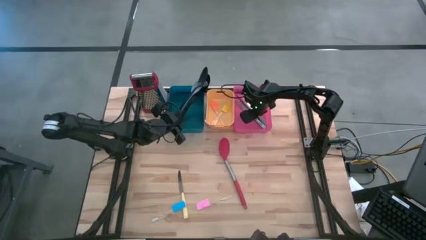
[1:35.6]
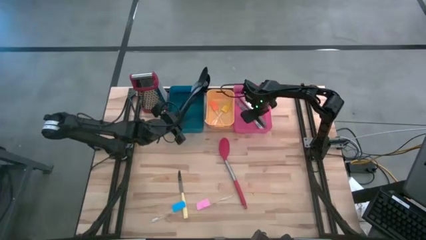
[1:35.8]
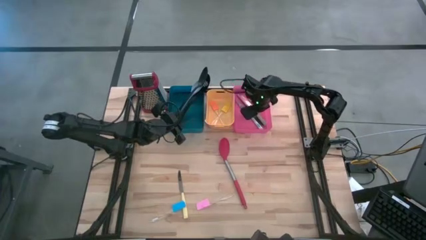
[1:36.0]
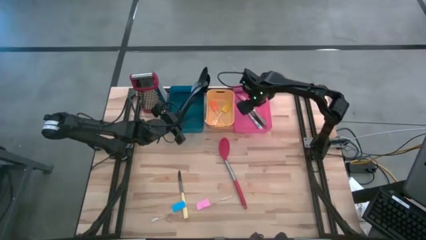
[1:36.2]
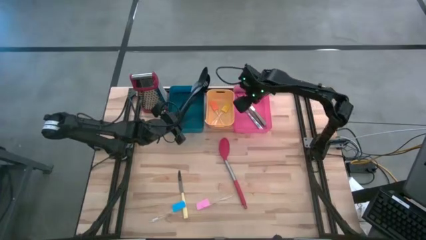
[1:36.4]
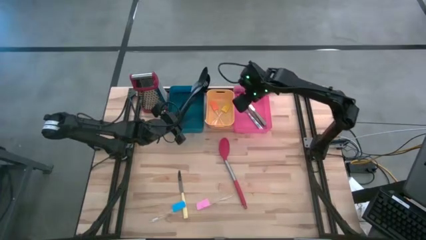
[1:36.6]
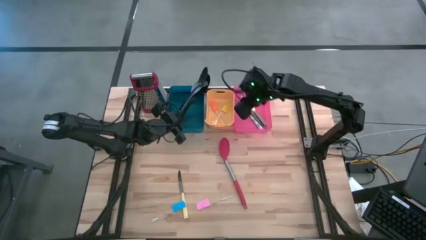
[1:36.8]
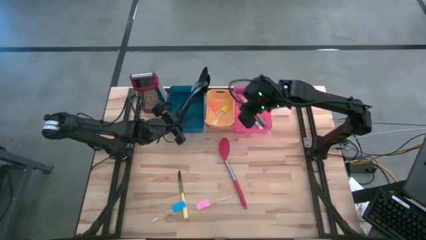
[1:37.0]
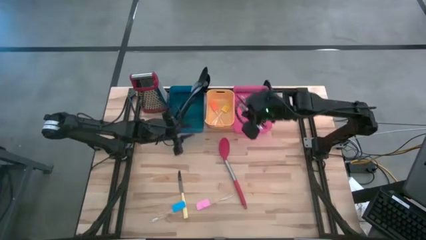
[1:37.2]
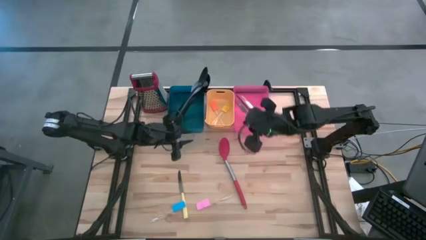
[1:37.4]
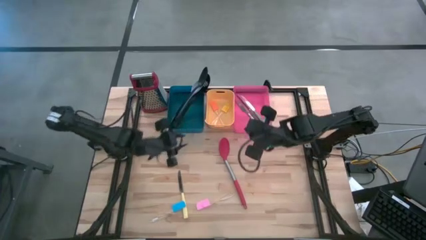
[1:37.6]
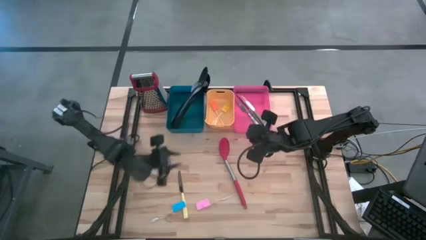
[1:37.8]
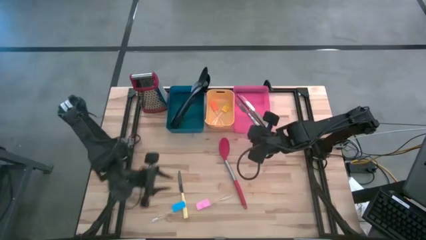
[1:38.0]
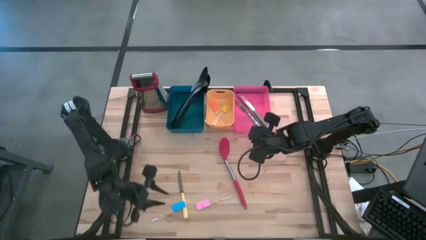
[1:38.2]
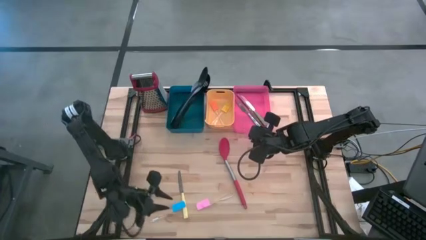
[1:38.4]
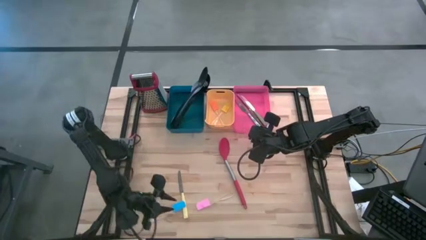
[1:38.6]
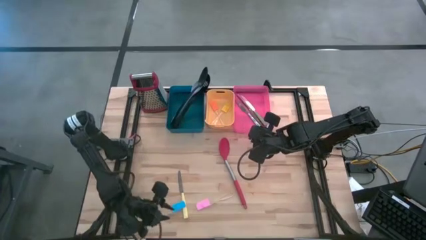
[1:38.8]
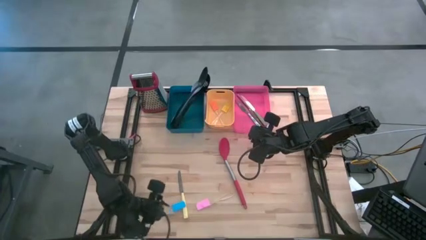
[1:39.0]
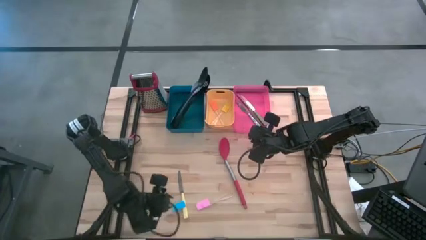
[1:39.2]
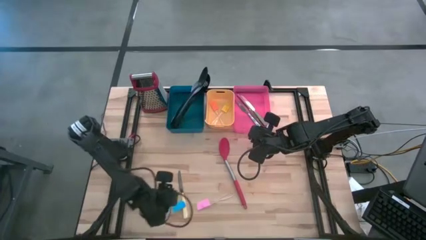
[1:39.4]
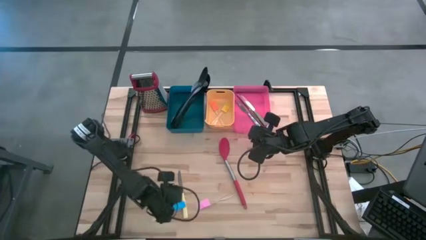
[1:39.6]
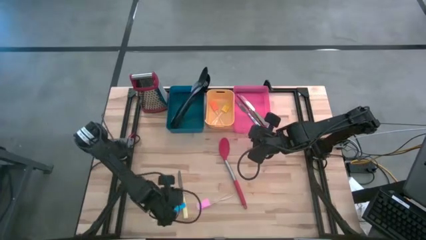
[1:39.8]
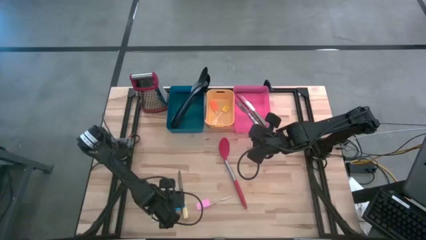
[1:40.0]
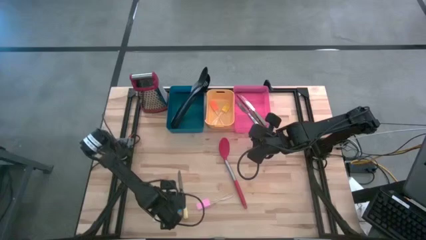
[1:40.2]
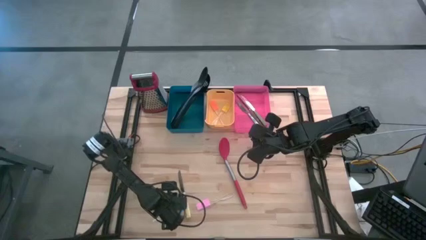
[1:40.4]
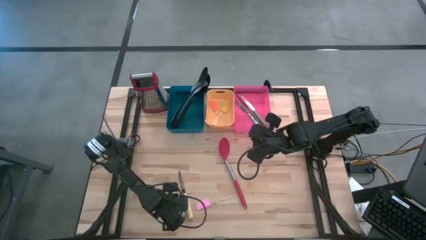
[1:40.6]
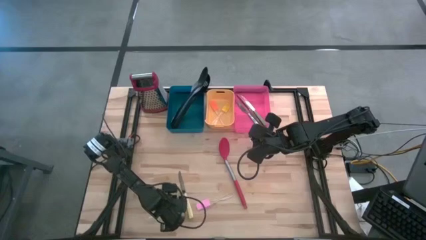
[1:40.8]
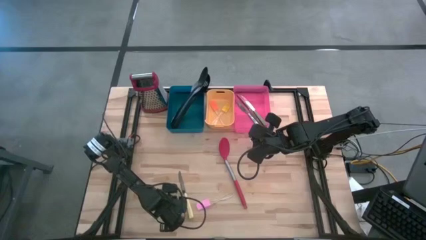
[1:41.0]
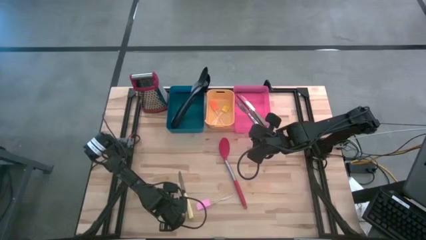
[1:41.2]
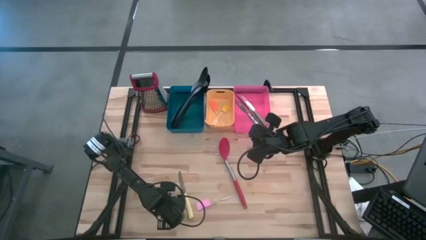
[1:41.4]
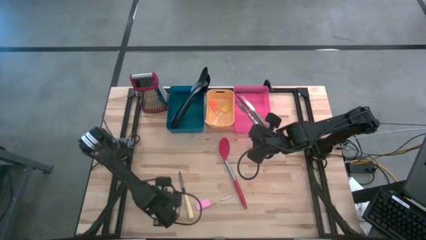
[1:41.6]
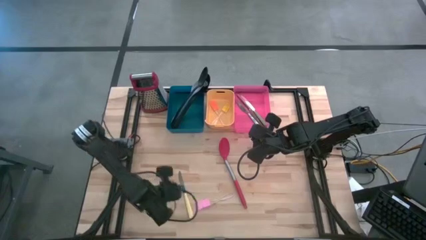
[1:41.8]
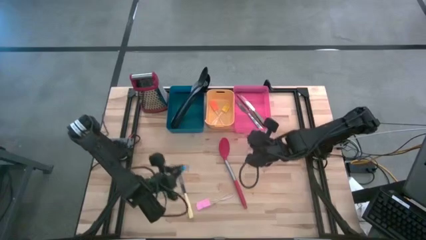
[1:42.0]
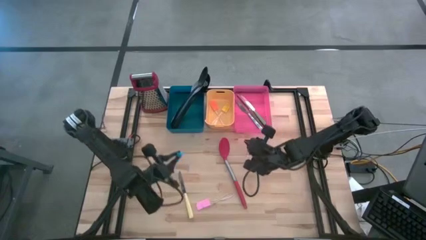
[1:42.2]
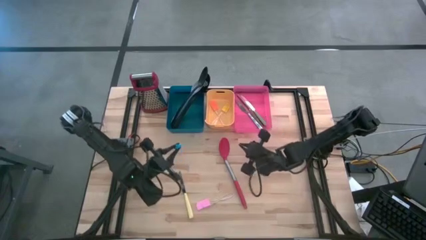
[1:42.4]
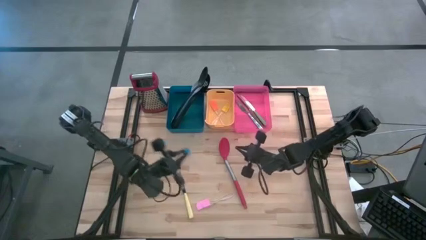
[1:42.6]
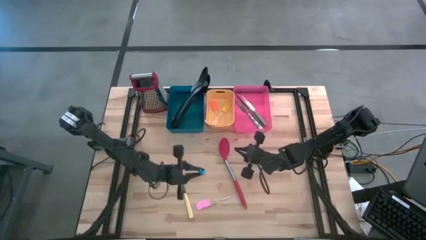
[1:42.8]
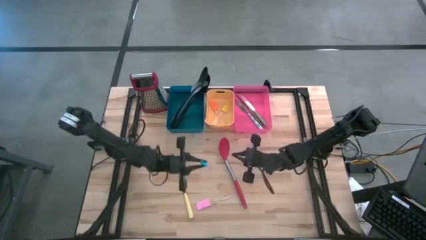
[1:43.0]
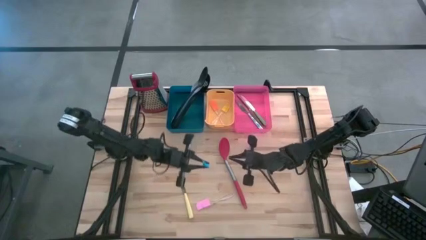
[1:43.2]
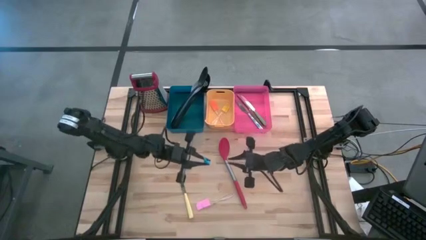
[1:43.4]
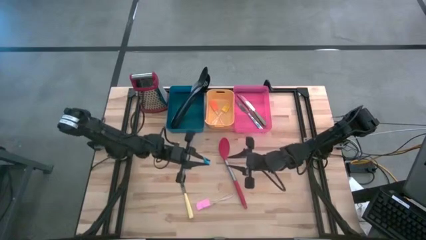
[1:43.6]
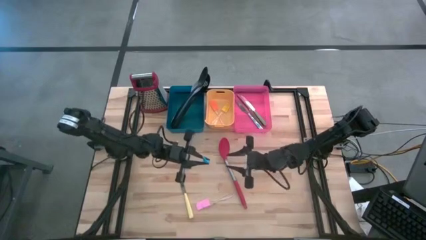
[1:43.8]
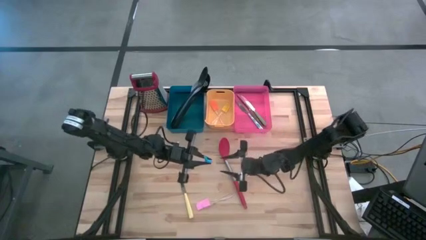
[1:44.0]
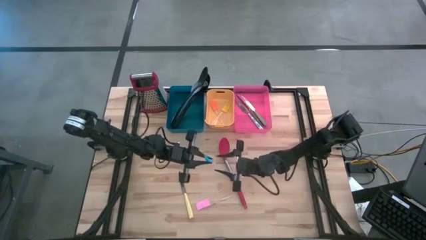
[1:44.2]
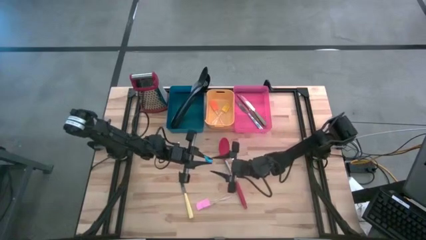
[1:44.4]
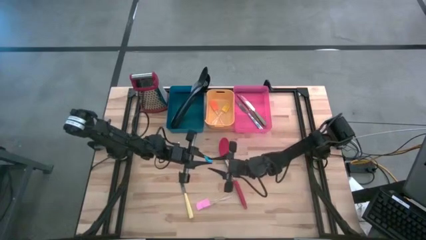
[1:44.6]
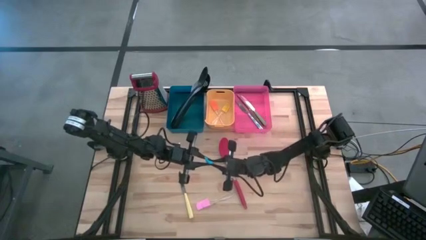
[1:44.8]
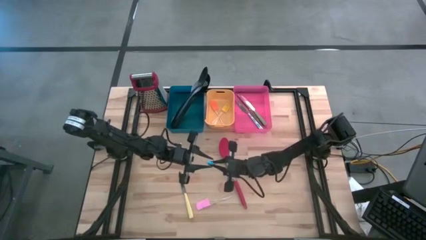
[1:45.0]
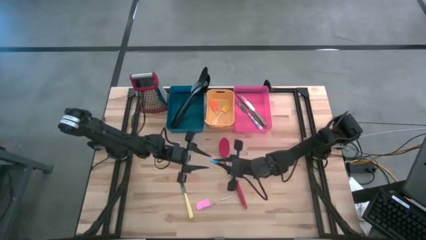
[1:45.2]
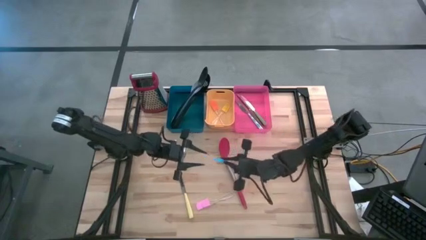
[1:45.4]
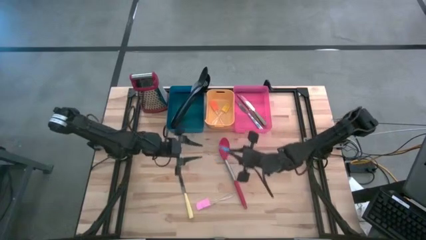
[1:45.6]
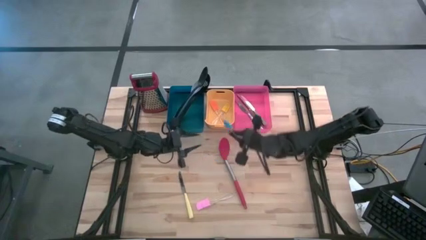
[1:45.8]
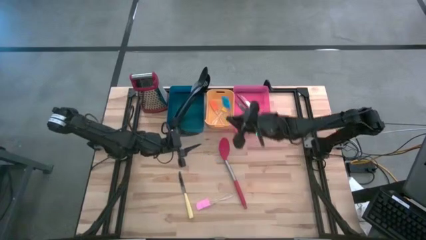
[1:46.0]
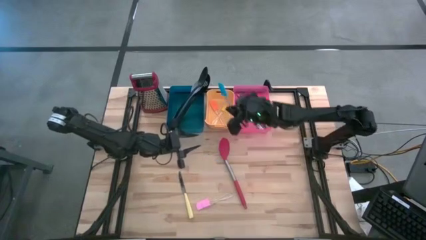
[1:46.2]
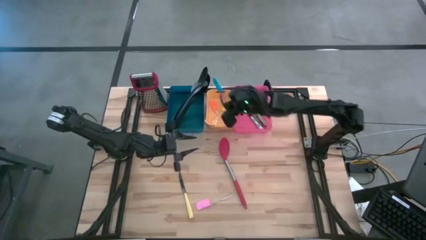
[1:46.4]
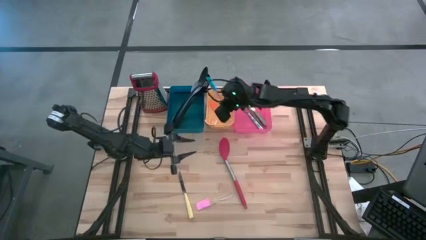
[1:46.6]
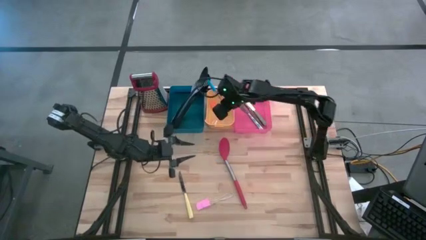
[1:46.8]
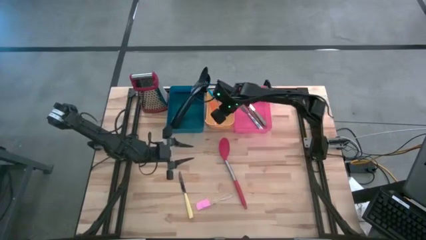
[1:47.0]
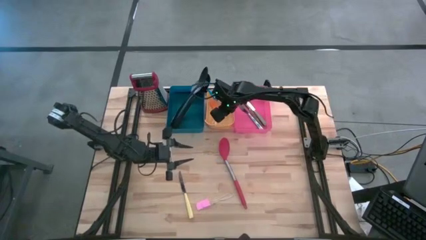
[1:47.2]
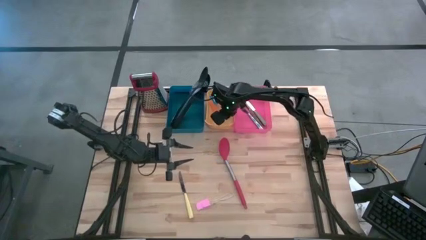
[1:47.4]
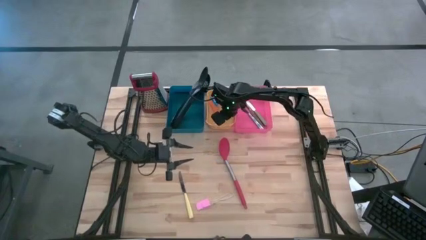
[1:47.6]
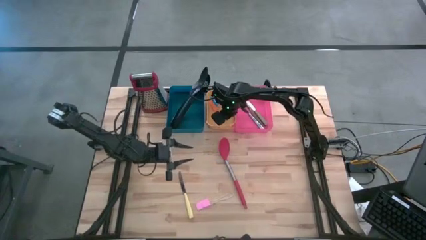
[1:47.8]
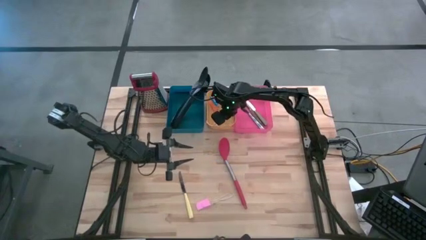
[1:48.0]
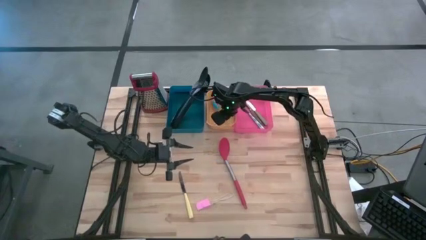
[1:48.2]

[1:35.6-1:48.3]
Task: Pick & Place Kitchen Items
Put the blue spatula into the yellow bin

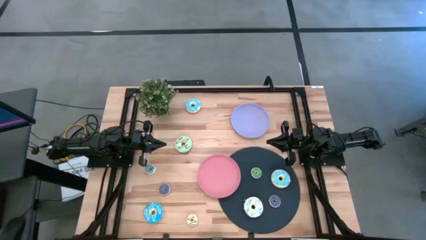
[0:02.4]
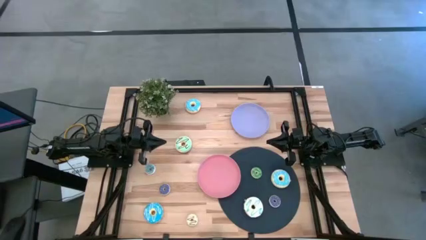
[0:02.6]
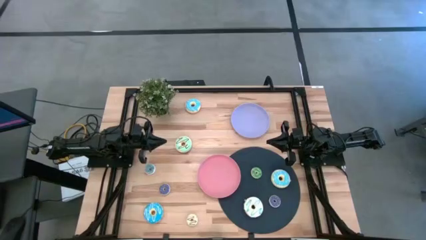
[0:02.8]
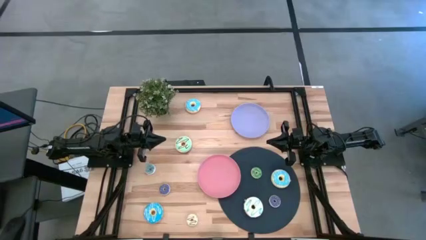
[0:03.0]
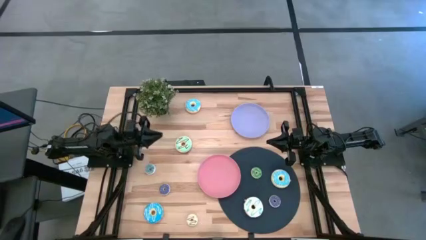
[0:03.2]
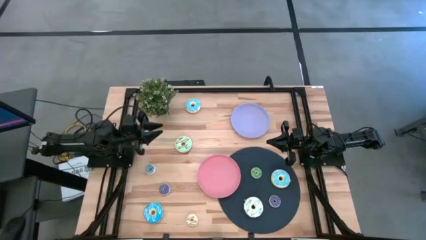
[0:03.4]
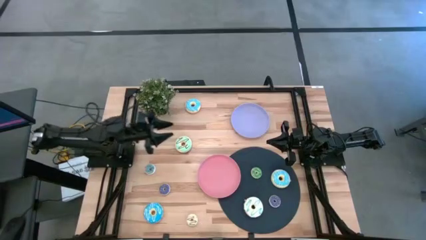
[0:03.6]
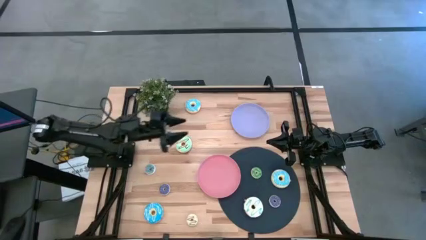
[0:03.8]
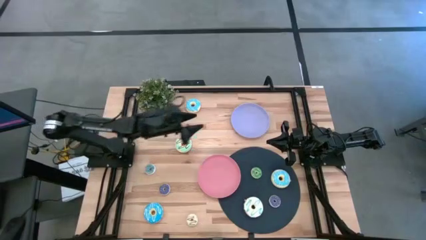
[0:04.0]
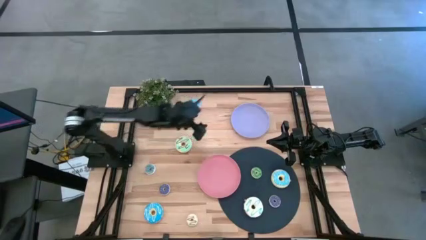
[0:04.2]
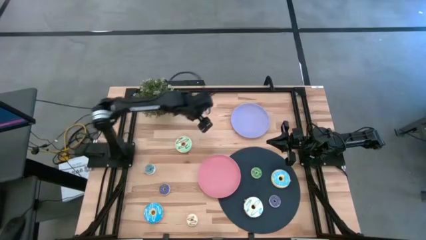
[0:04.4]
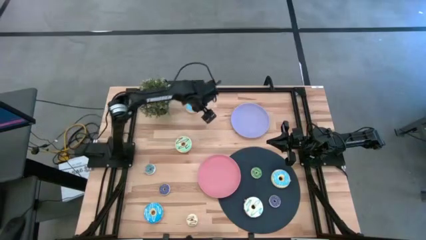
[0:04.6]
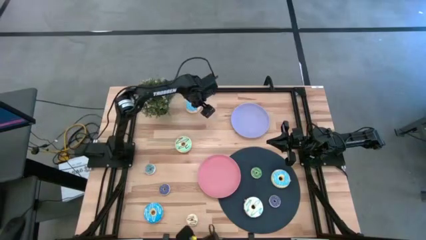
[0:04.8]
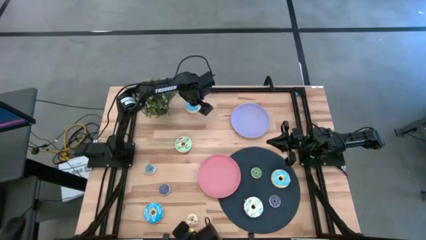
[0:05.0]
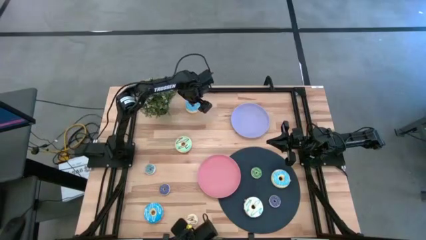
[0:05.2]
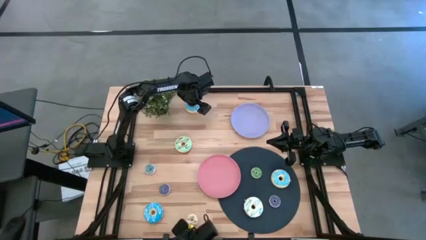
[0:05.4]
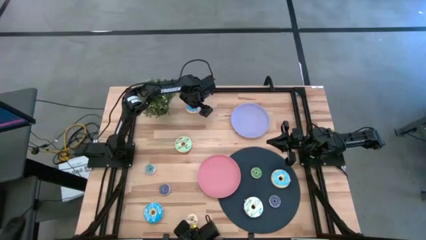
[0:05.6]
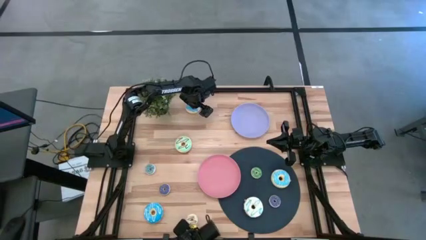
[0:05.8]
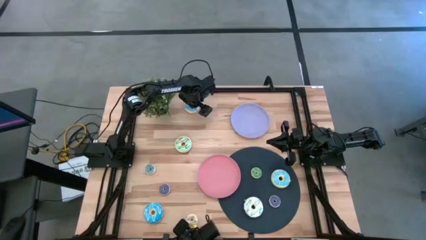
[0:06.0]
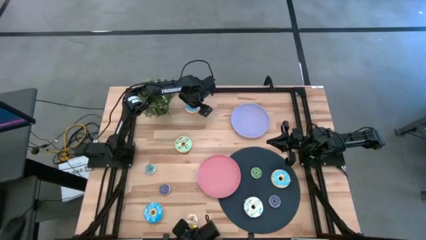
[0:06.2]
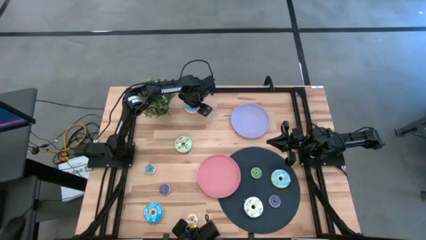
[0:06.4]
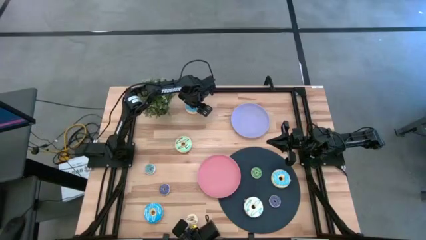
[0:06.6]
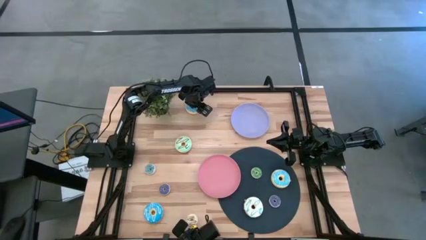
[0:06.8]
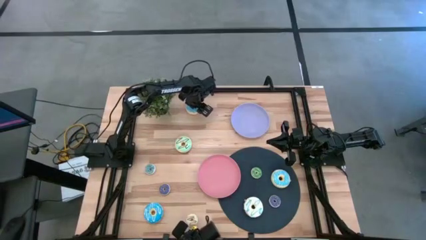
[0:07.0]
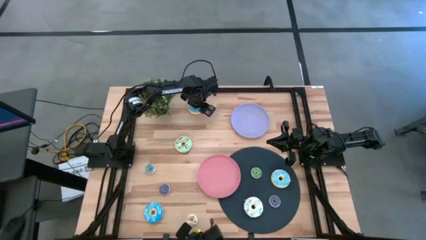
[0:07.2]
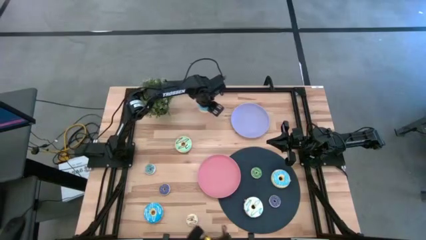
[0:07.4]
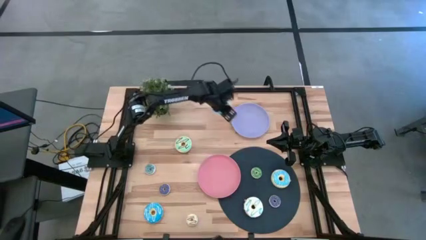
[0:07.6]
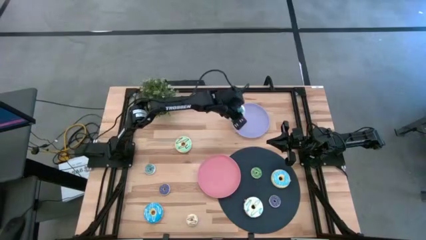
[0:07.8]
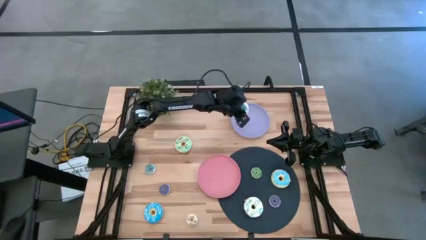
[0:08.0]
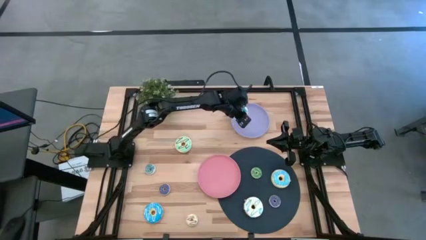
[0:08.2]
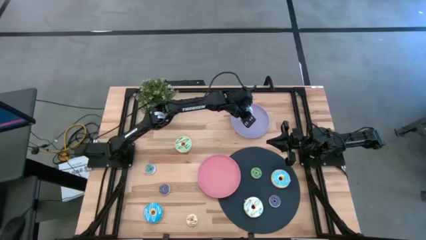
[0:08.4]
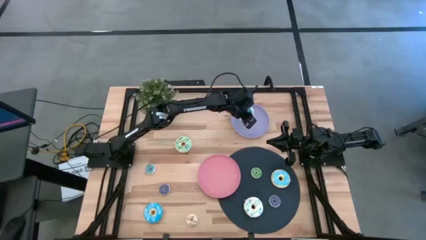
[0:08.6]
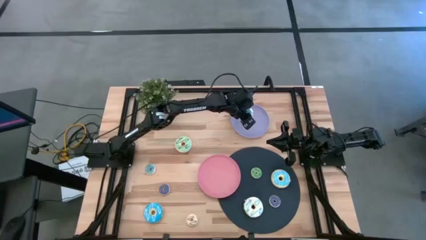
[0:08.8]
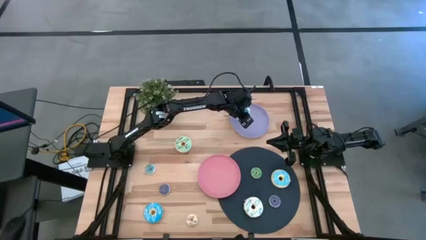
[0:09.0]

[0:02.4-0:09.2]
Task: Pick & Place donuts
Put the top big blue donut on the purple plate
